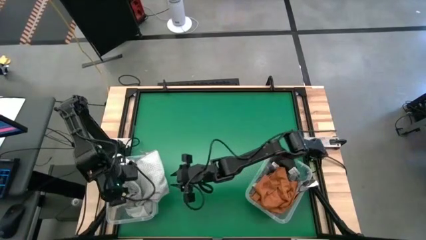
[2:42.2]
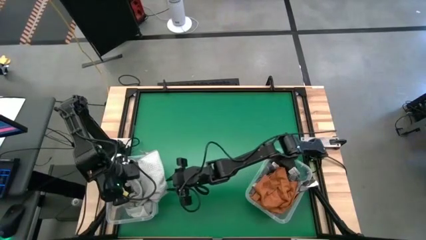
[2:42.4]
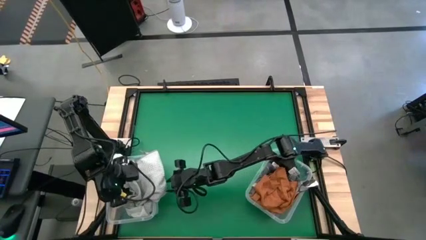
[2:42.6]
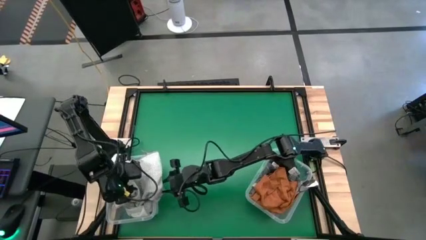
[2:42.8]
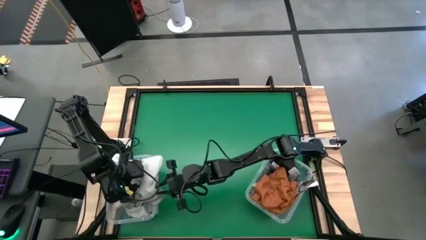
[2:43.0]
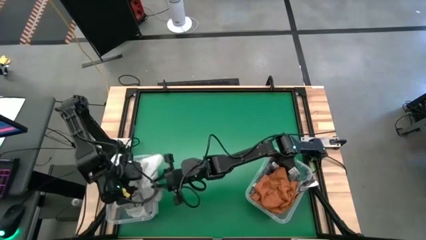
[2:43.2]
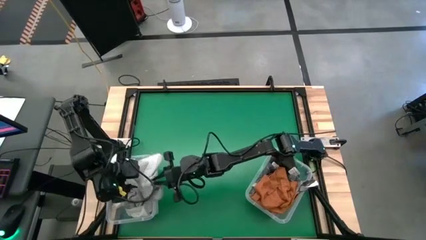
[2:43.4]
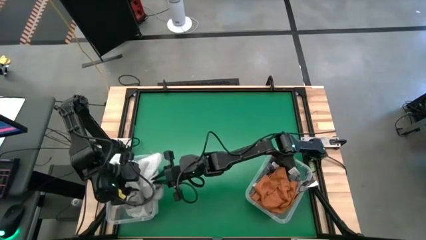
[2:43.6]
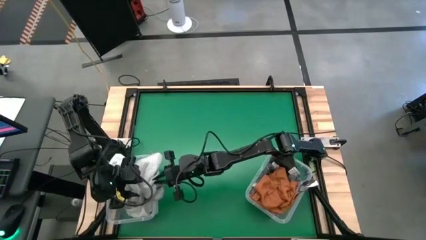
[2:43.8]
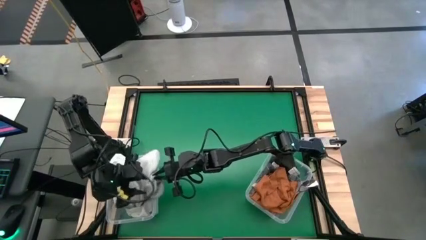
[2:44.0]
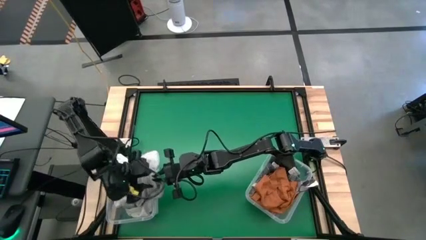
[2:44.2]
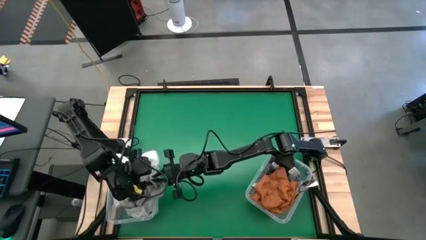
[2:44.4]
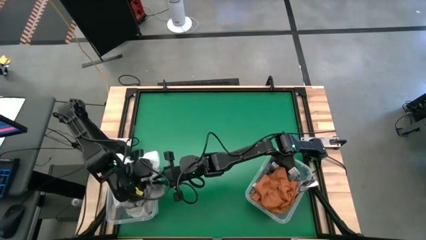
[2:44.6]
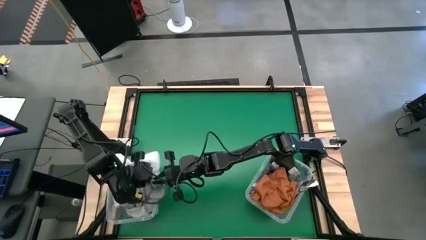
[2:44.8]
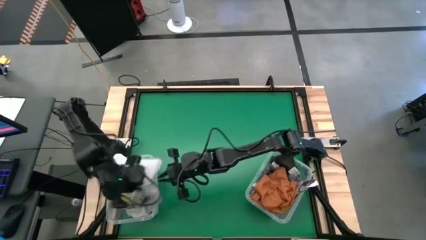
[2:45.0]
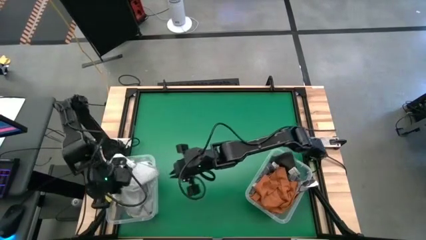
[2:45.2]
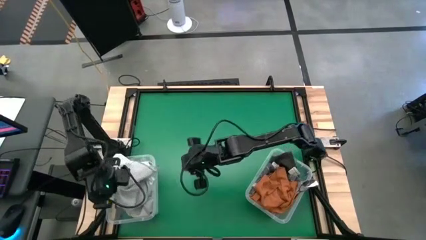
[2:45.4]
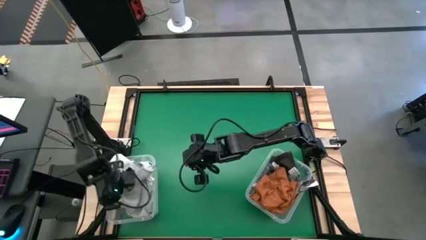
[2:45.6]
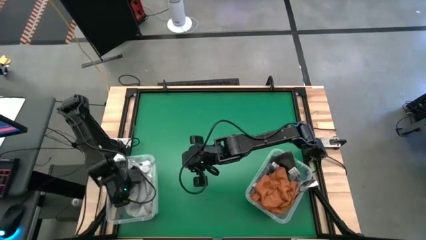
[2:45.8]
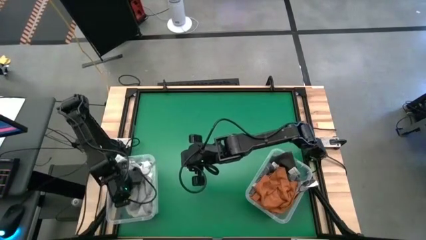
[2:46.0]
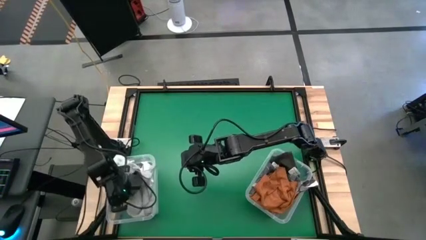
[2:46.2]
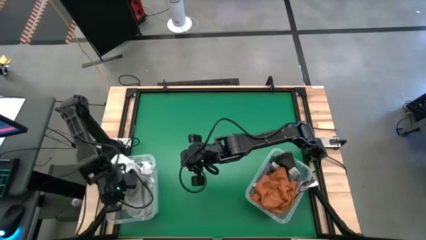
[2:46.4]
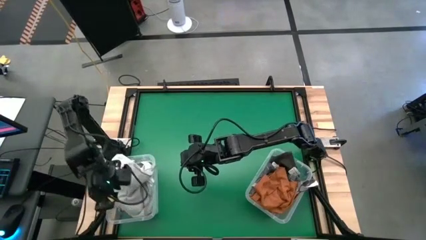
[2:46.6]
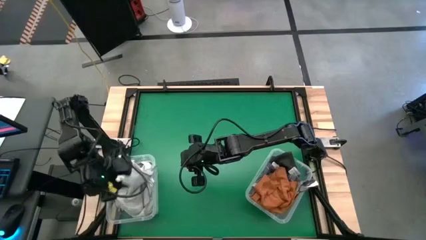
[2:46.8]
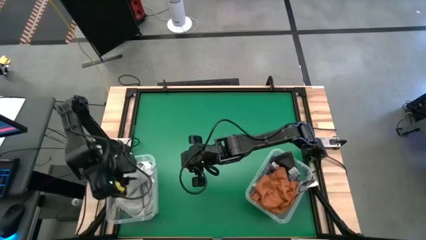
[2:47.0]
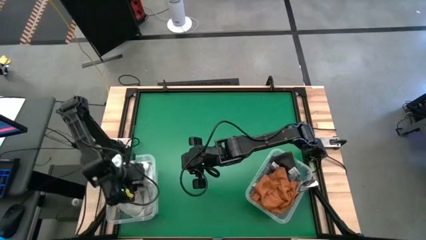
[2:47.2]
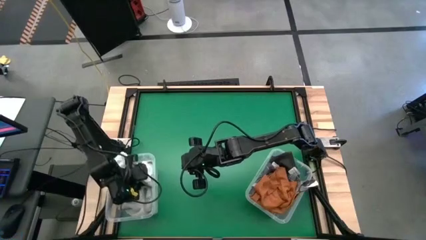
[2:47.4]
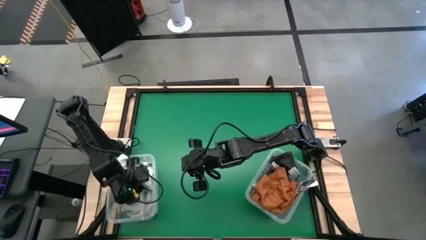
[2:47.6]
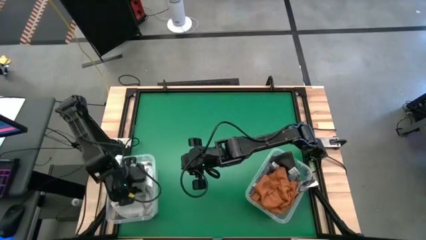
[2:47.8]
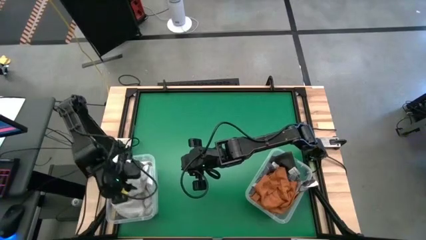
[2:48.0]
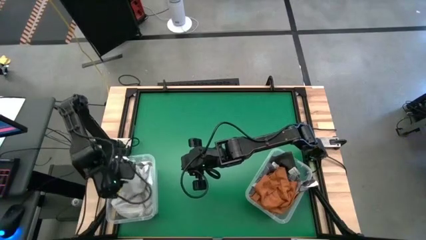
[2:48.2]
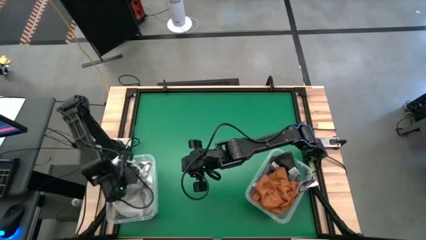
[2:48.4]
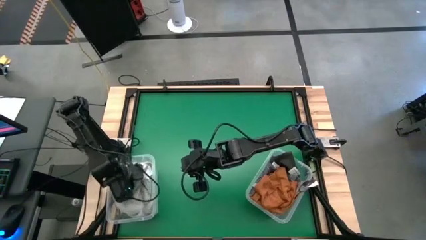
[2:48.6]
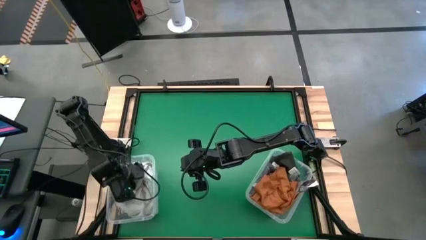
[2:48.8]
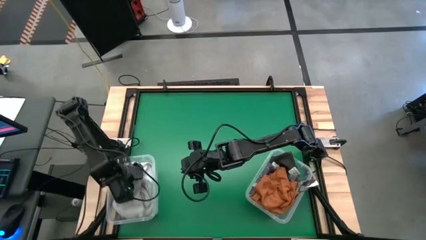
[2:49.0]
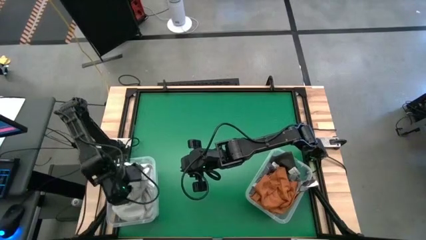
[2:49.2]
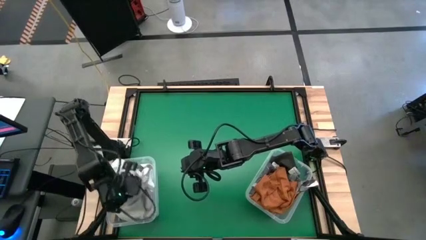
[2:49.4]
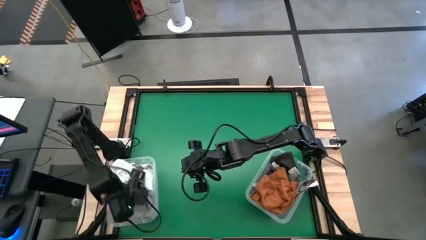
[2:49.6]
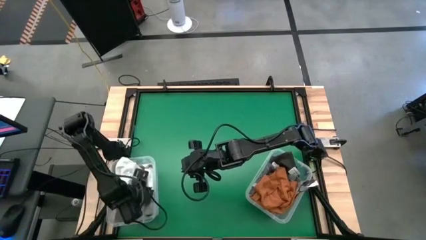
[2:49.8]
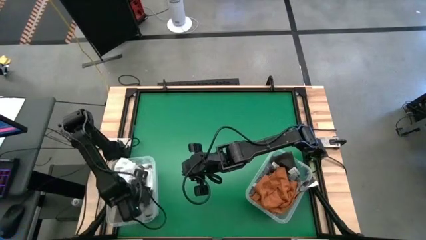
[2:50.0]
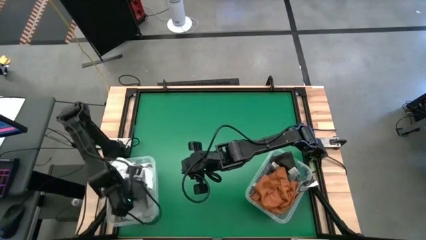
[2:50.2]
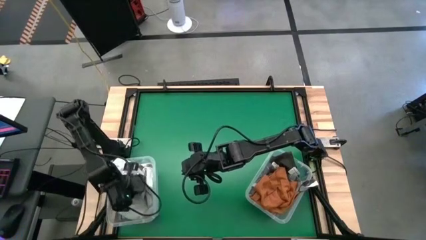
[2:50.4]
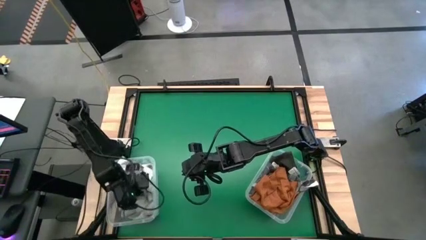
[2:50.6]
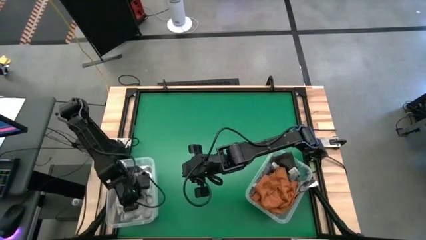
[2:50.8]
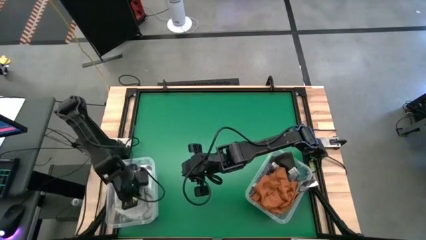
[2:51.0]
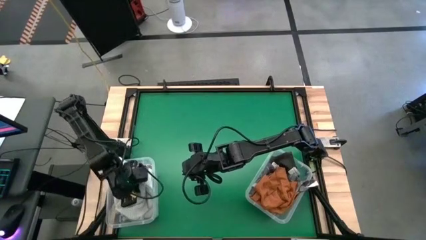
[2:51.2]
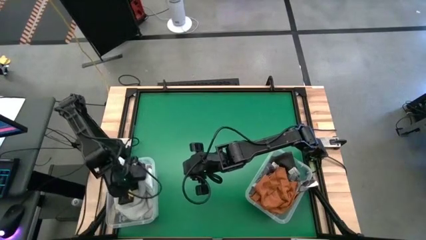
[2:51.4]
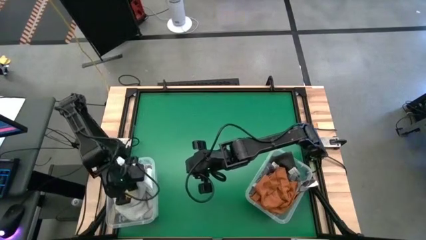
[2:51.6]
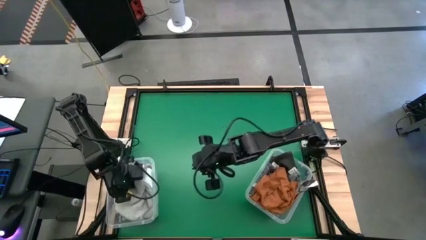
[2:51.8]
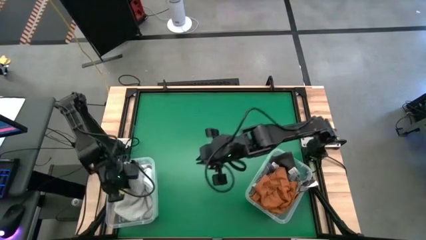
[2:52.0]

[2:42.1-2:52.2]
Task: Sort towels by color in basket
Put the gray towel into the left transparent bin

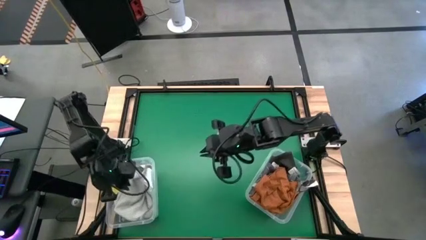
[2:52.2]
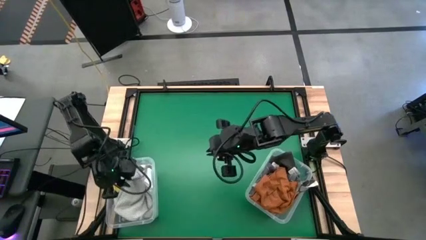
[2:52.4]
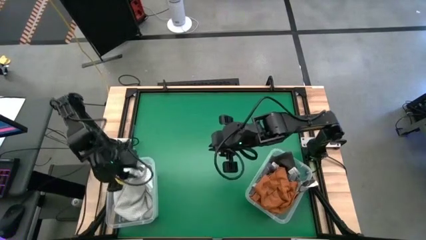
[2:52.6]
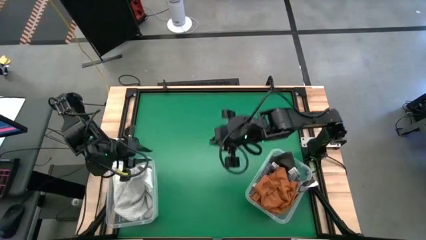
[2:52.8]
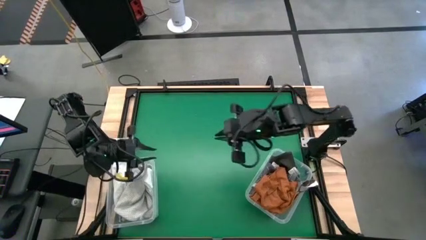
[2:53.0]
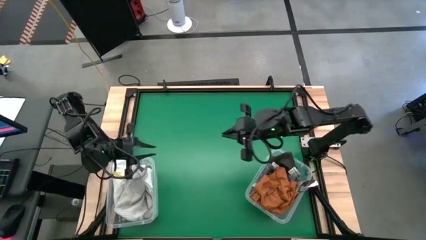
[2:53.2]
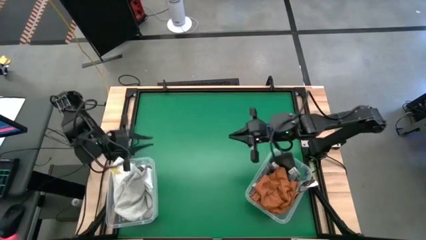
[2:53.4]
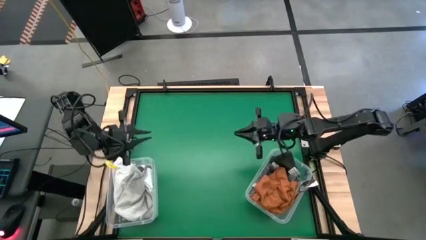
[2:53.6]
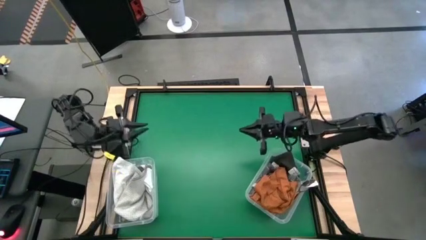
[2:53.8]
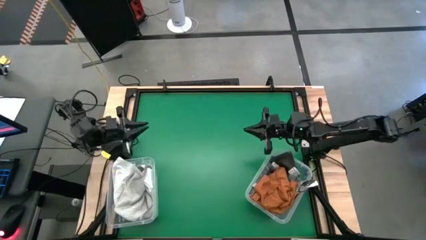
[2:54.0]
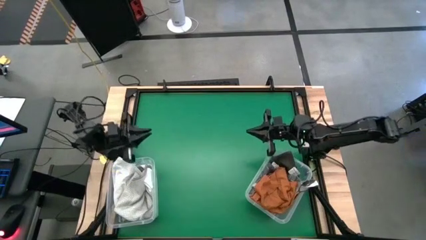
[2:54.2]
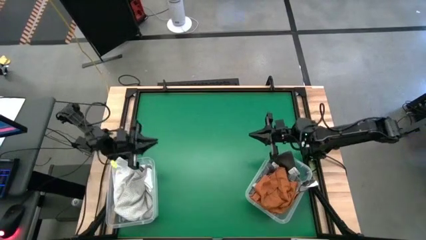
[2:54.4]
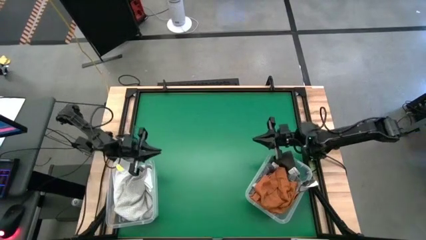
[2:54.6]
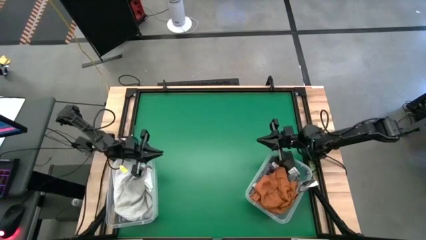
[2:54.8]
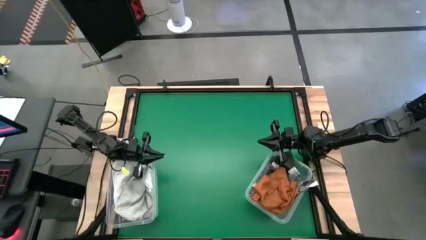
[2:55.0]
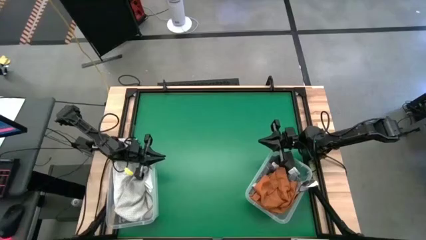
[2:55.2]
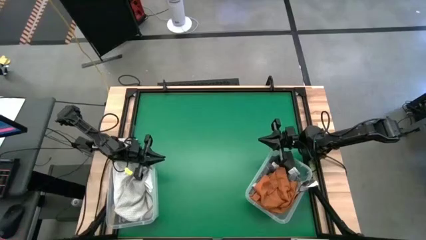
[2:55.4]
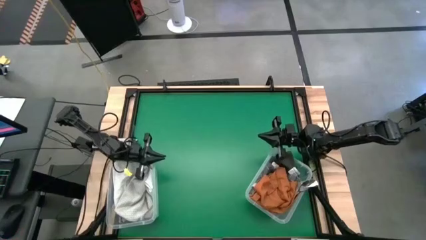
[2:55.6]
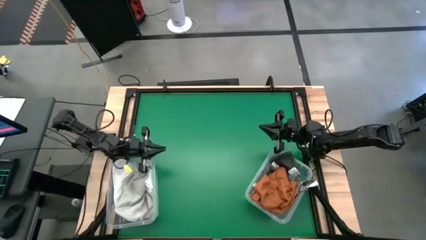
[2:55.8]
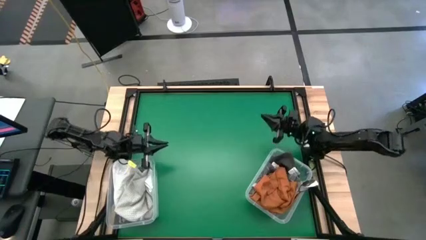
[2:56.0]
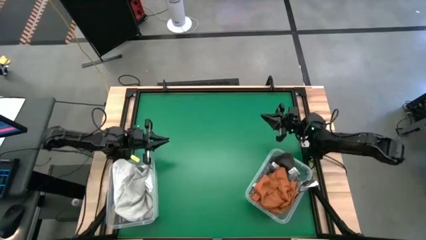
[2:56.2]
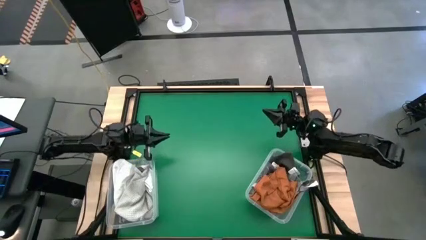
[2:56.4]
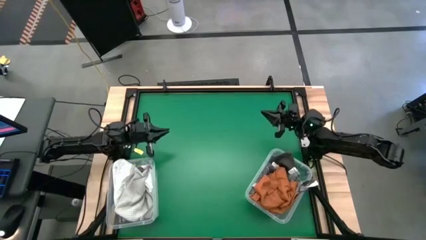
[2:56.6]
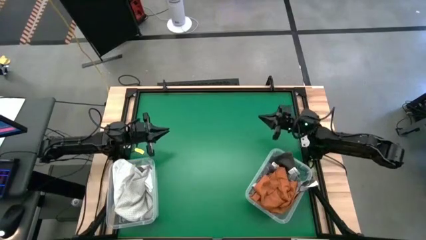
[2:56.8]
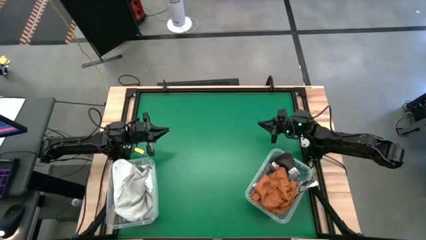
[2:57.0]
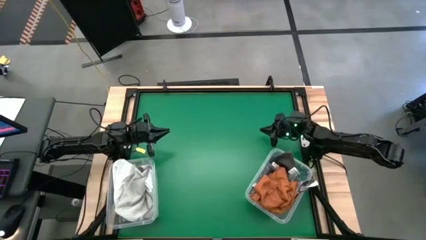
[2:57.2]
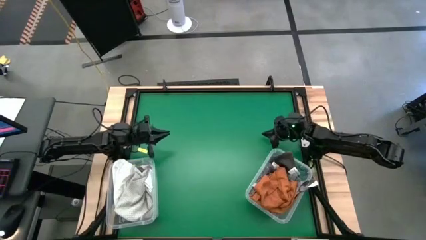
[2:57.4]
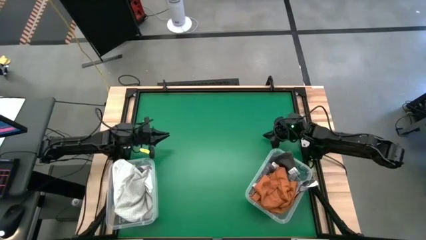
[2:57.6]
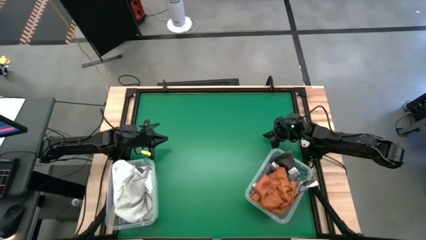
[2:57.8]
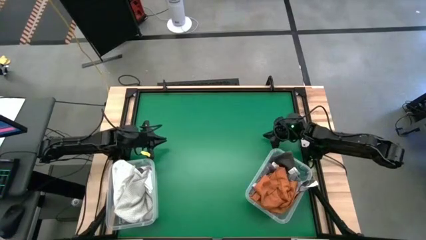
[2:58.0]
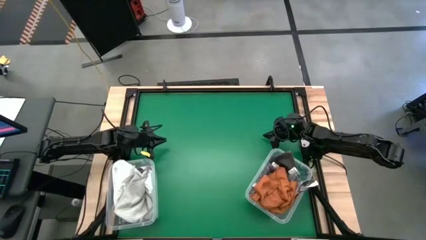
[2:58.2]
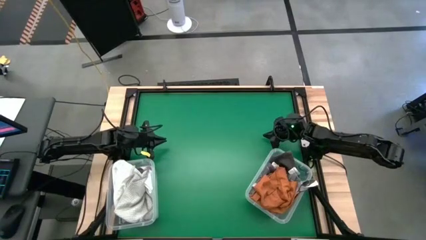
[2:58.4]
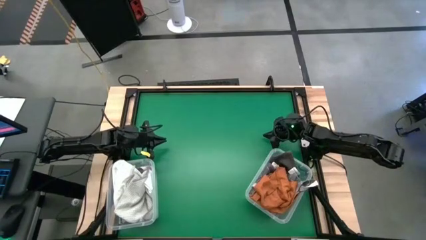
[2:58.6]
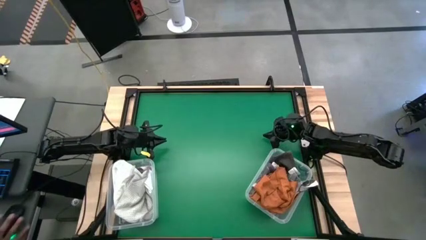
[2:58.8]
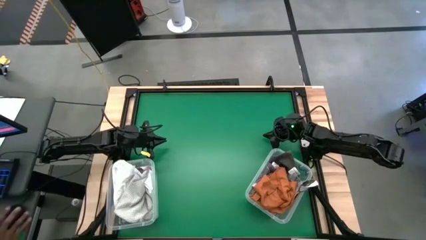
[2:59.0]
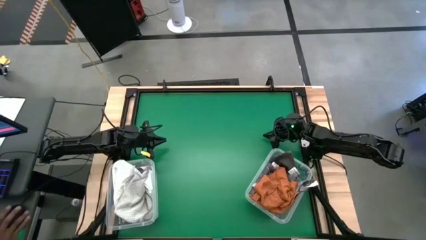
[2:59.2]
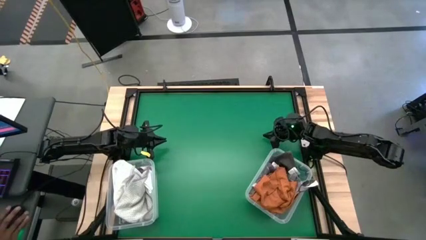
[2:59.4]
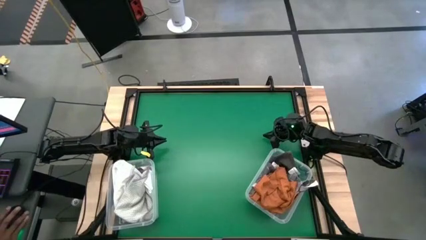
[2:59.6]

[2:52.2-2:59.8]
Return to Home Position
